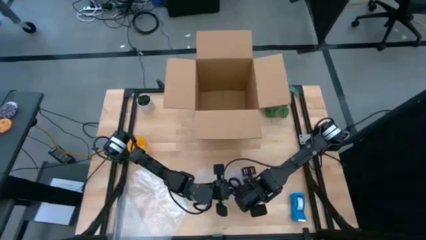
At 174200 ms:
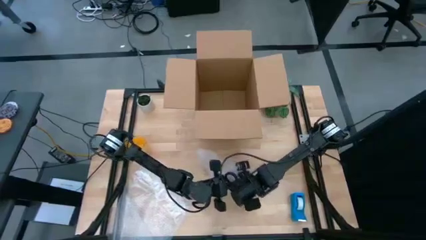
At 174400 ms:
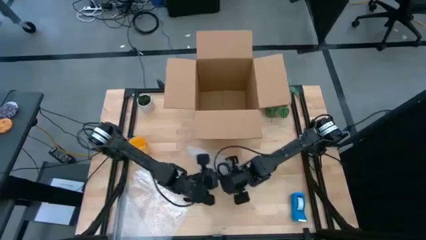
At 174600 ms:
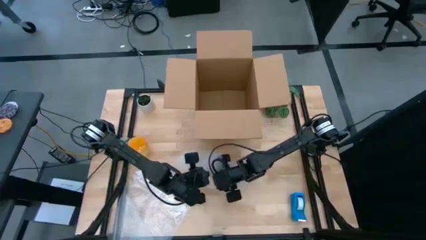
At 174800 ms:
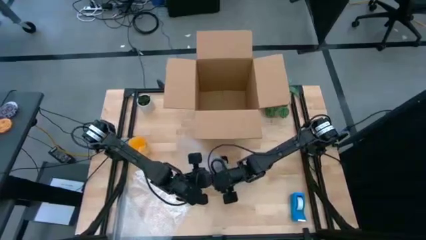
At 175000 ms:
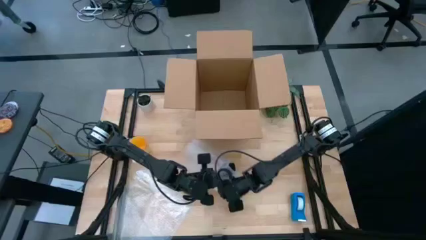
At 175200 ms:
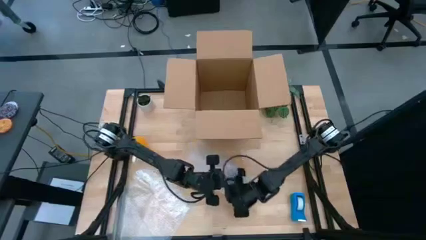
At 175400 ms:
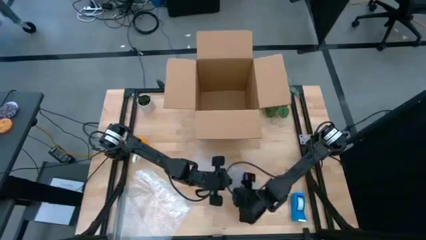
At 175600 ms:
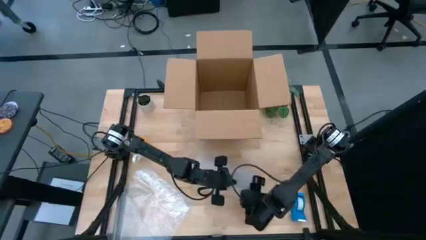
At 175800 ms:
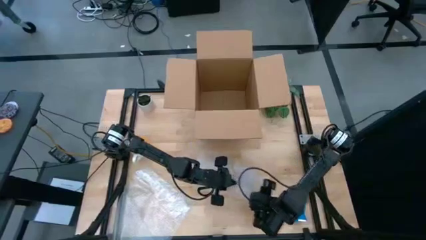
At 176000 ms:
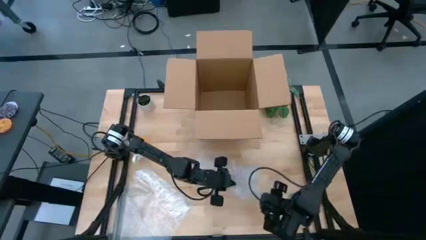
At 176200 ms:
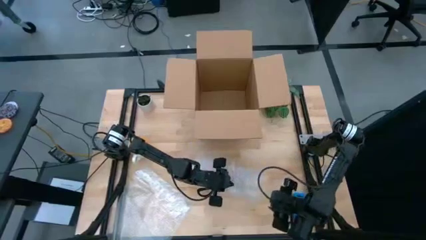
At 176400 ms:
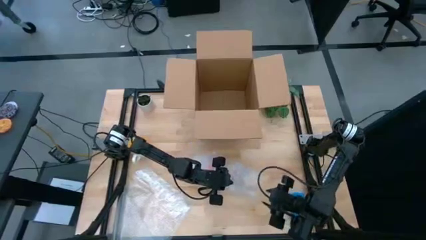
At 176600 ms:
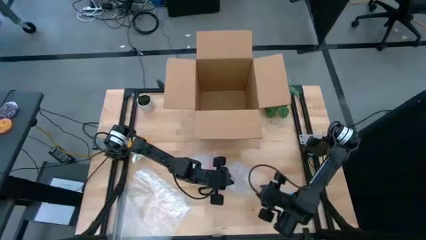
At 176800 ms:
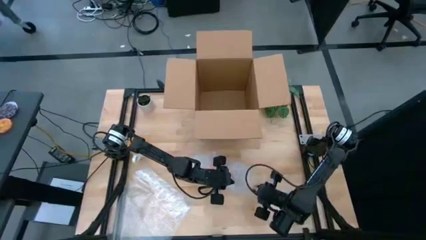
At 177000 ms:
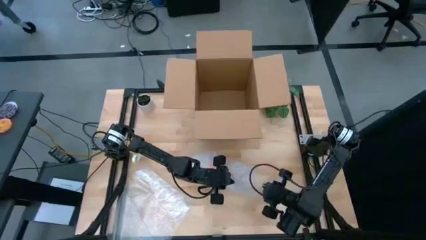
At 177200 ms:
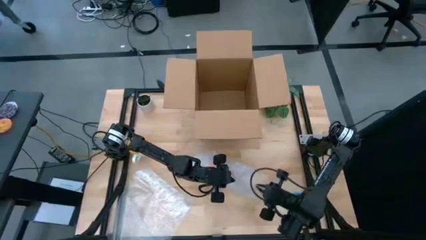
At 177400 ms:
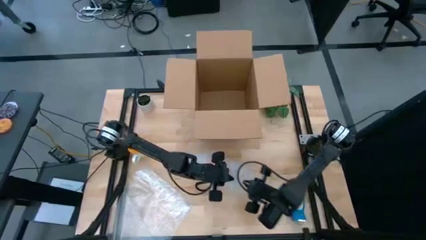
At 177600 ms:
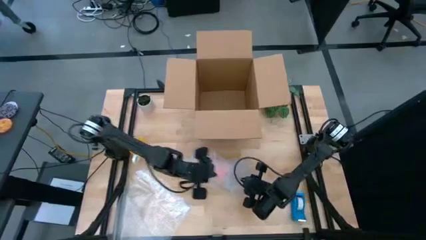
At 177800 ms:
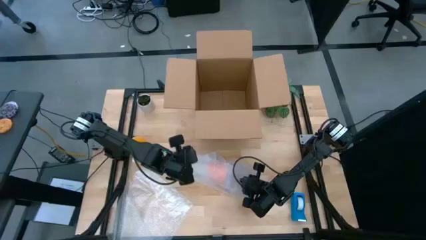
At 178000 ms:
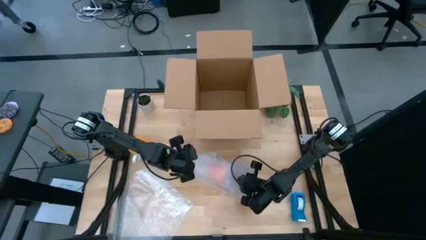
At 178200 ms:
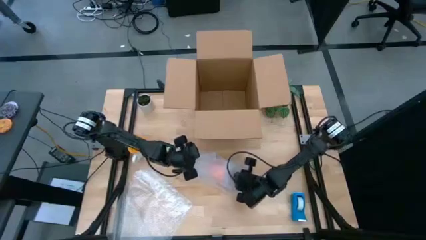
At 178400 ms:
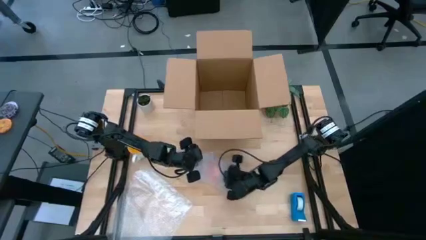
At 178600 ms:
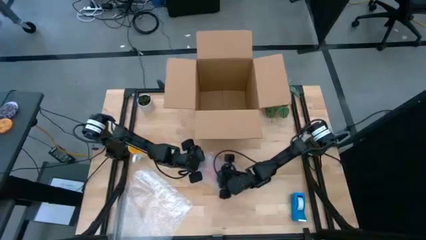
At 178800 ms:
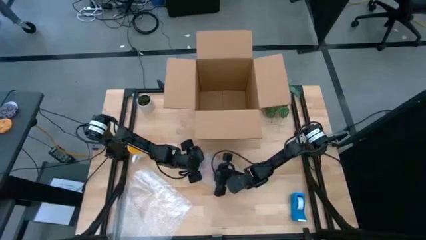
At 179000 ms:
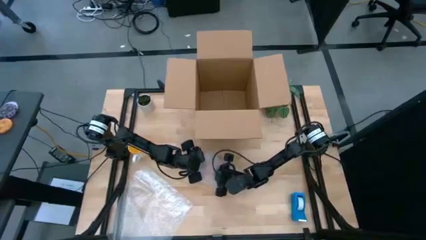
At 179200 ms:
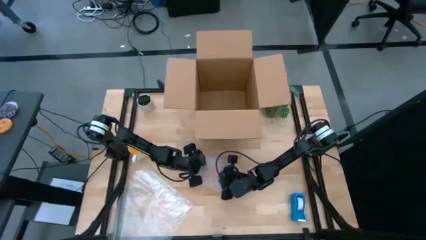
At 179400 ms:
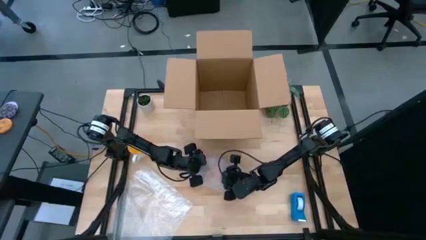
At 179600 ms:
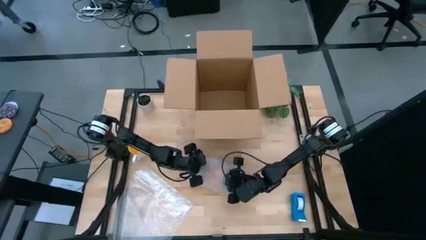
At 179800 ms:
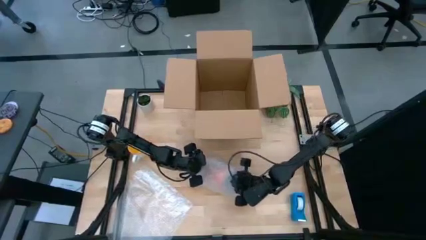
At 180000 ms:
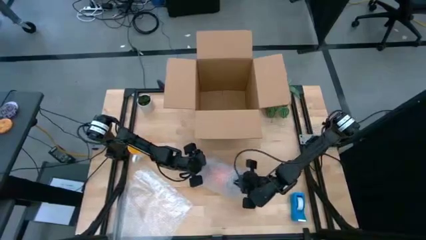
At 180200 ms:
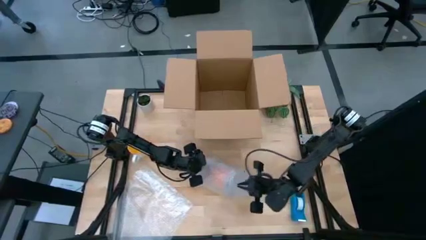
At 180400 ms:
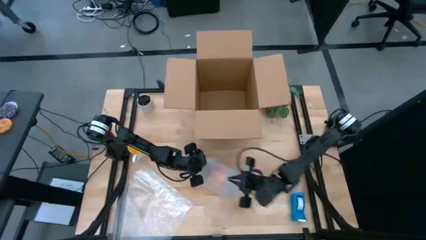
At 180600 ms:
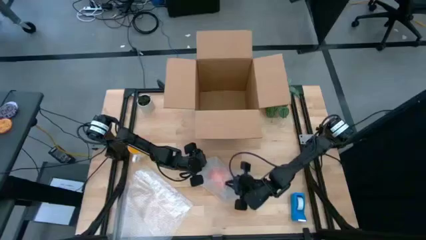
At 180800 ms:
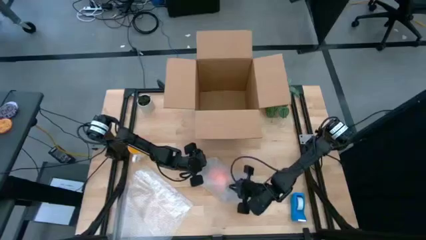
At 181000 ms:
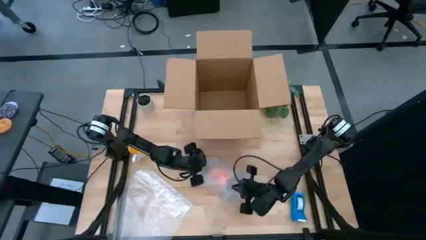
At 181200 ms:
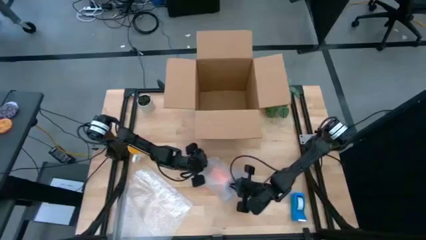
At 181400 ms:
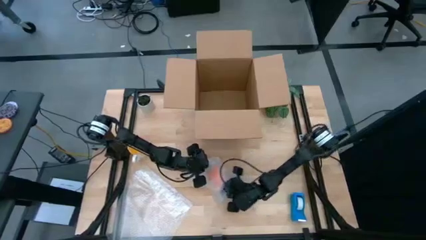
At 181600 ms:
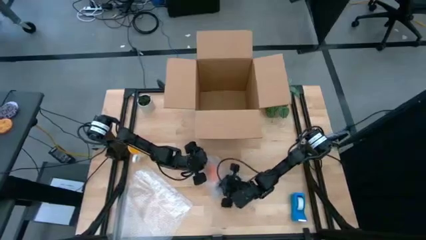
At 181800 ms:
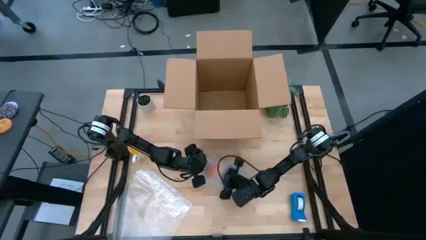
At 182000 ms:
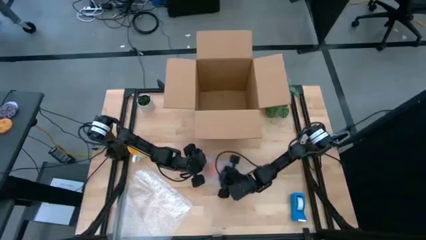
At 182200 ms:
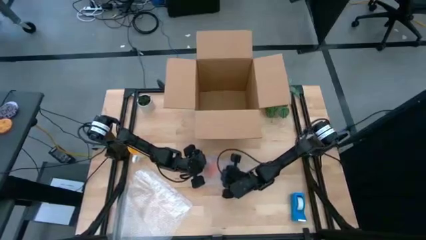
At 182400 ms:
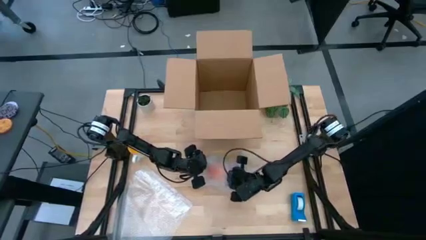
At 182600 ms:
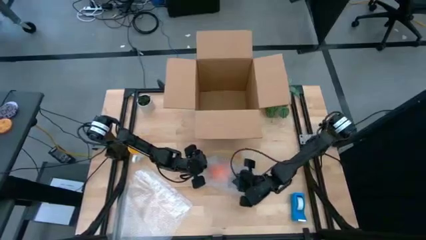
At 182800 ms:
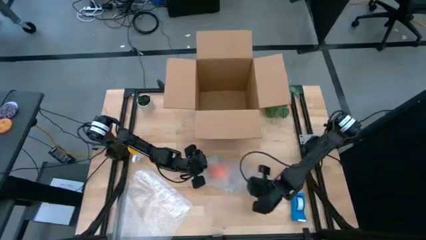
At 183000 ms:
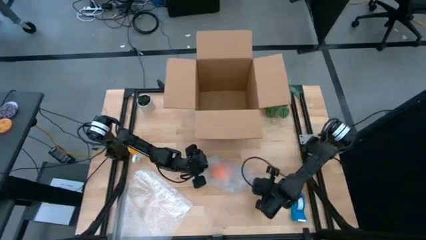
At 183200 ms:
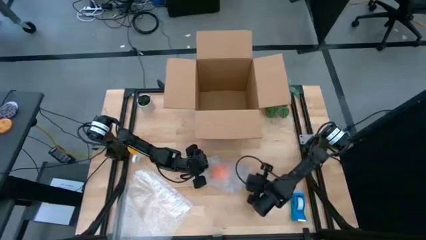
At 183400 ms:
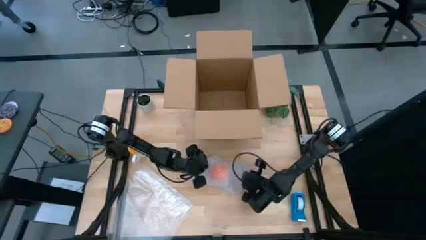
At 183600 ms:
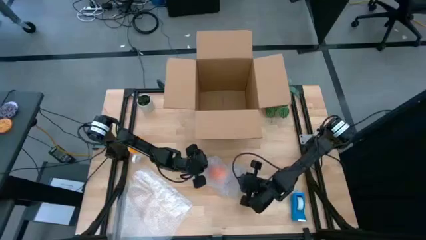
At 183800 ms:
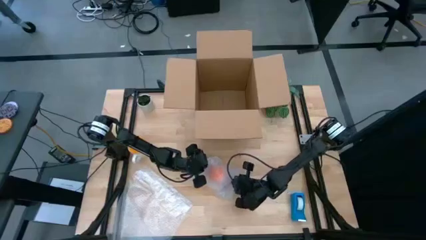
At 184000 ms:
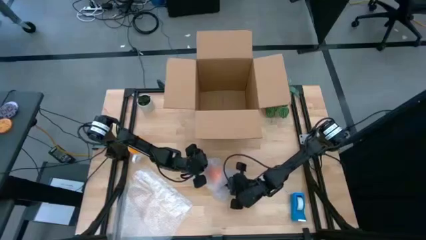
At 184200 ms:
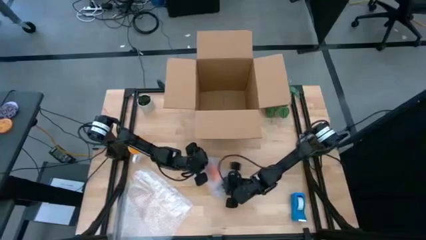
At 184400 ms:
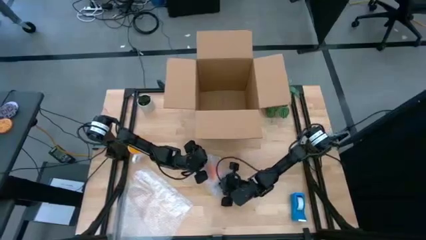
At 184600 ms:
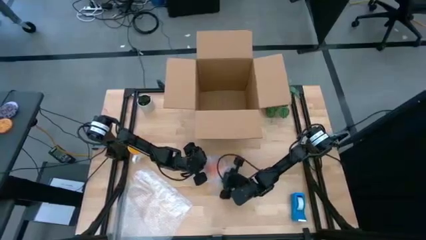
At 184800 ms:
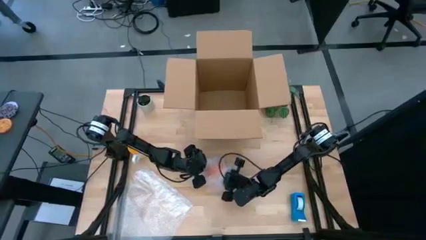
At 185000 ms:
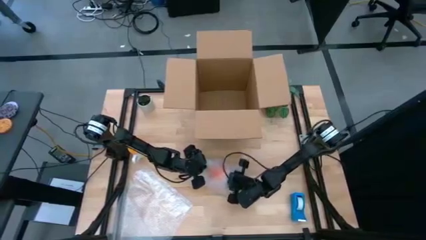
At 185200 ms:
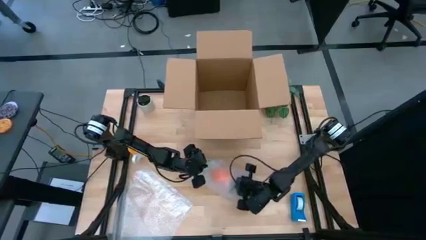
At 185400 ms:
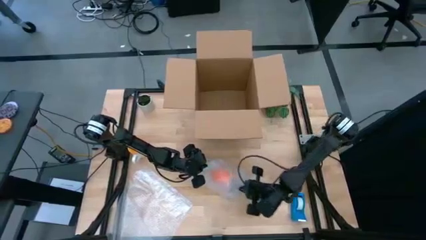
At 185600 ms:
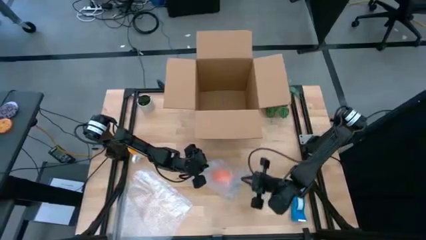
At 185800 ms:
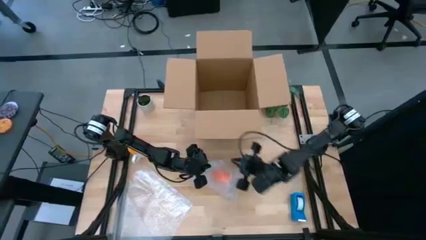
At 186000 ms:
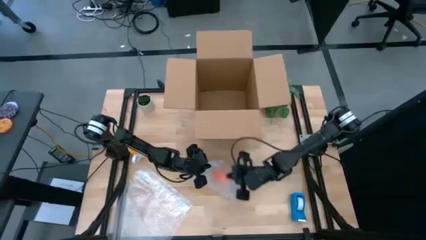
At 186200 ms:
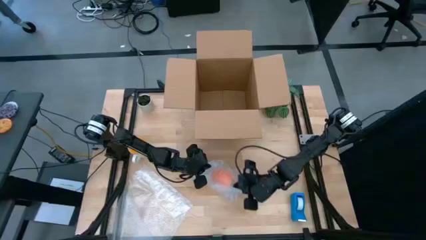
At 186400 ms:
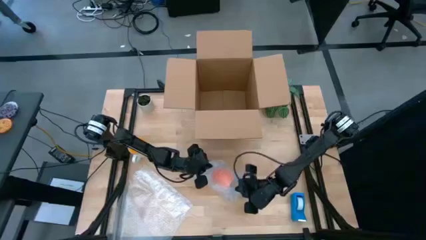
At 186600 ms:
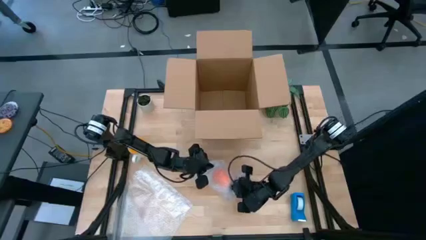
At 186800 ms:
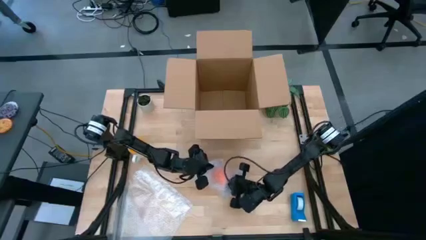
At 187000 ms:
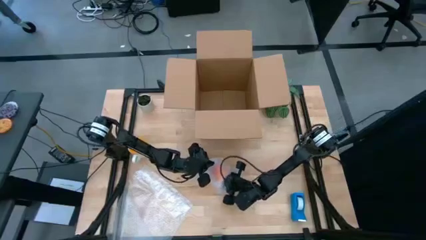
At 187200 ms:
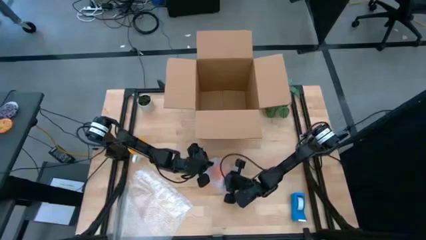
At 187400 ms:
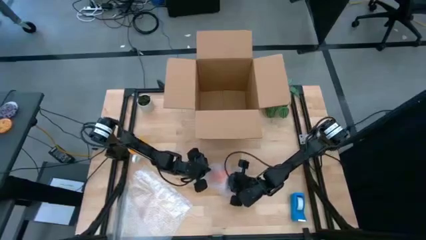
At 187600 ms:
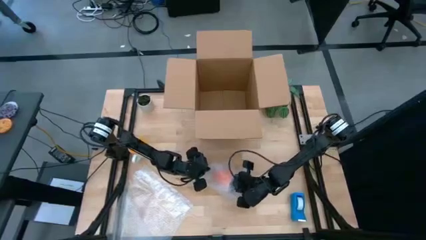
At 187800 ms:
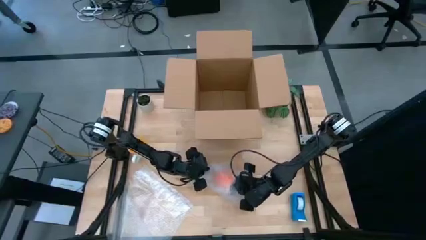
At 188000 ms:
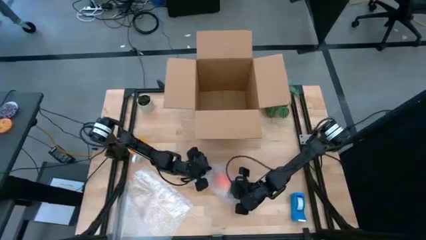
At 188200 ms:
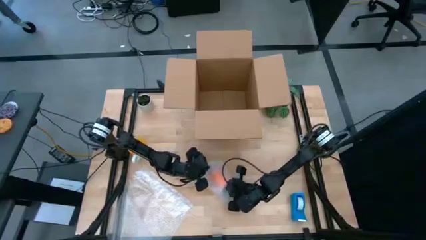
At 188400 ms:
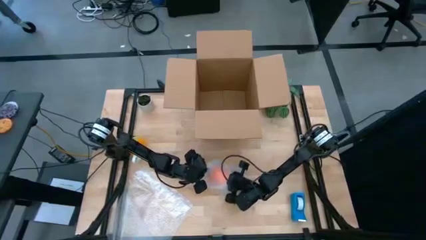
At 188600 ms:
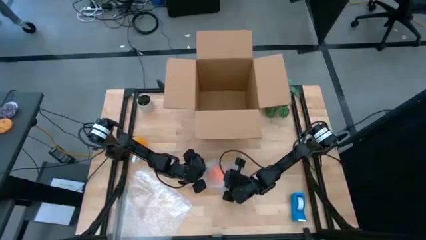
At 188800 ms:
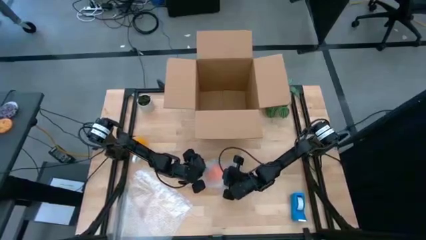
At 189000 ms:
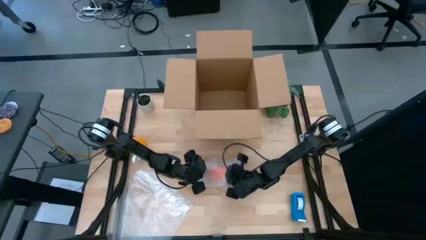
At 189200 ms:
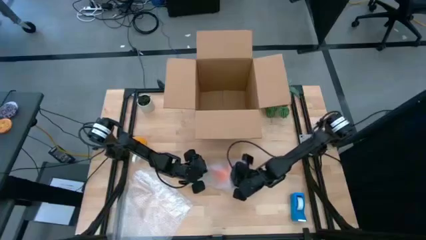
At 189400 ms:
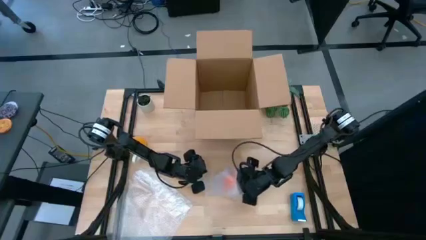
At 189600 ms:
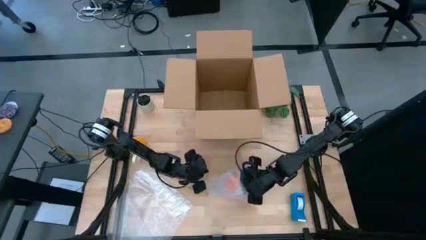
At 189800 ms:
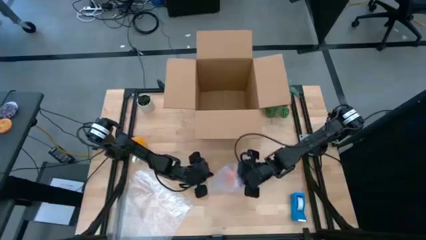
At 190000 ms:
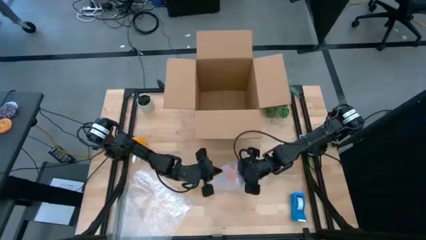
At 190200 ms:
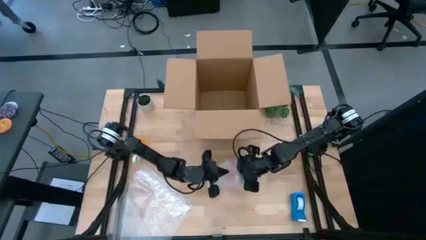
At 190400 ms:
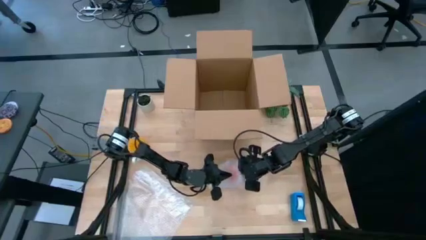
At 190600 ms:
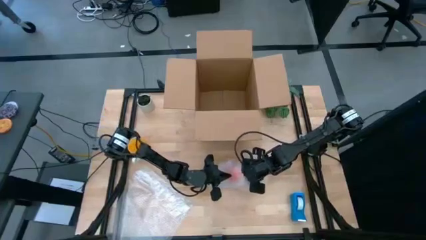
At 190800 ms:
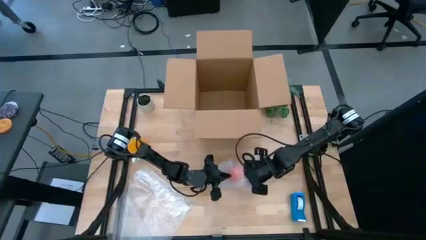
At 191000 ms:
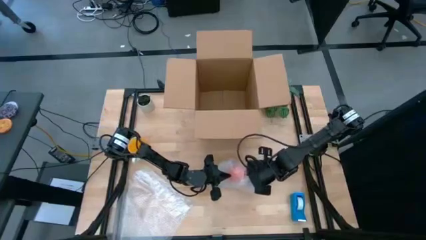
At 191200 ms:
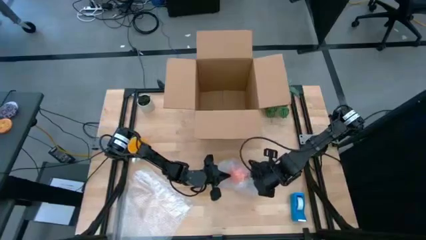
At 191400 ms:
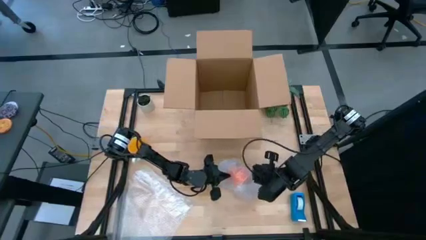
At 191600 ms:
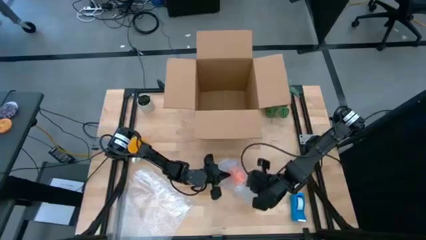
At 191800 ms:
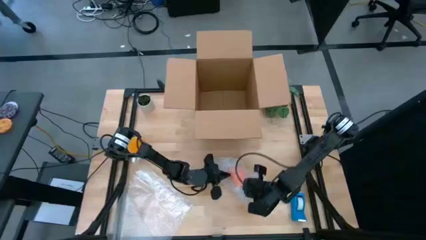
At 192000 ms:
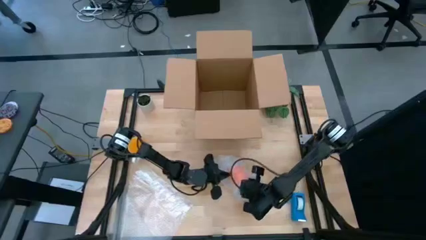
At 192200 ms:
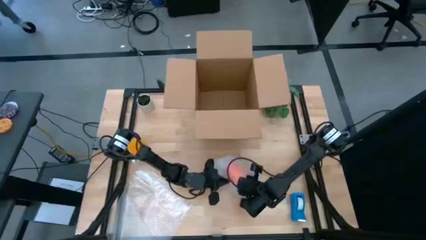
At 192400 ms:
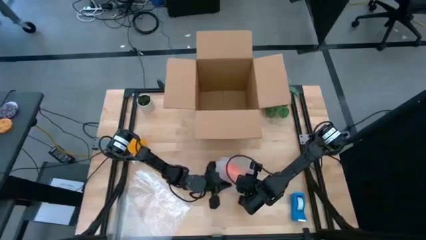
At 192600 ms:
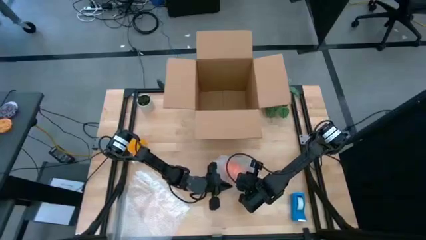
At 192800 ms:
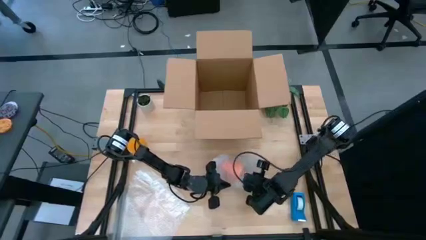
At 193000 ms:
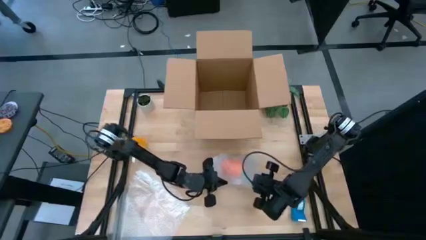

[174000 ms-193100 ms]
Task: wrap mug
Wrap the orange mug with the bubble wrap
